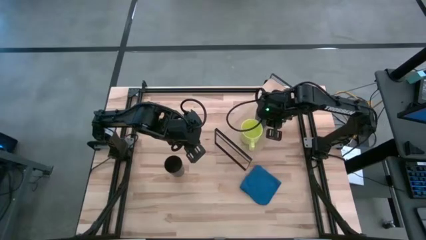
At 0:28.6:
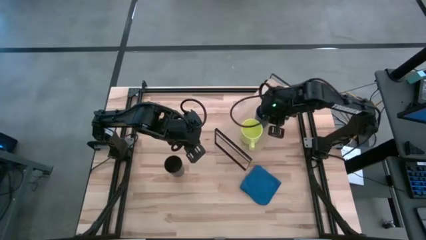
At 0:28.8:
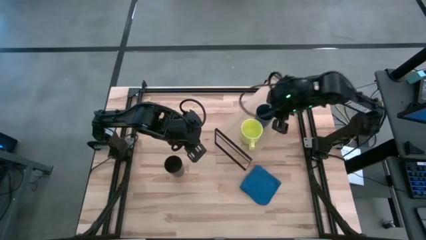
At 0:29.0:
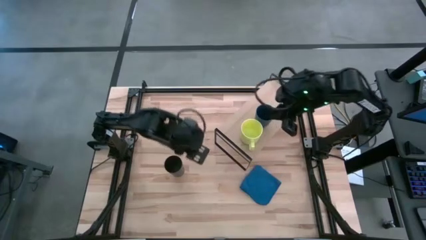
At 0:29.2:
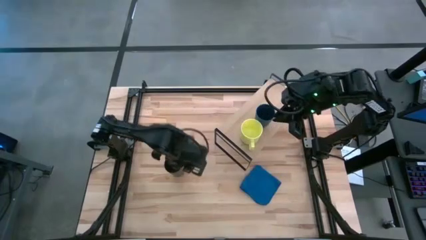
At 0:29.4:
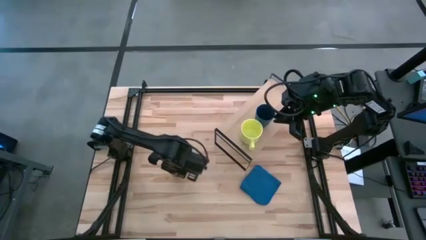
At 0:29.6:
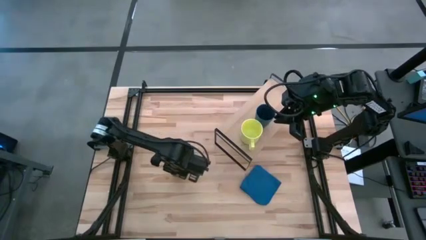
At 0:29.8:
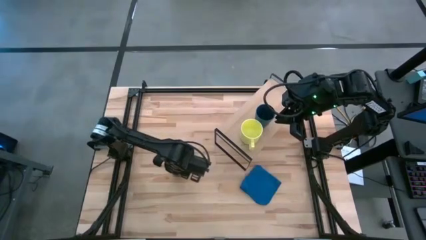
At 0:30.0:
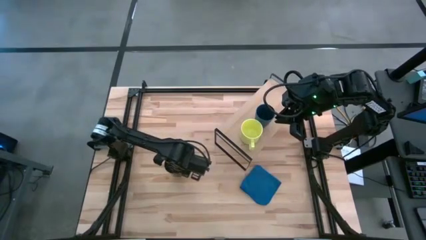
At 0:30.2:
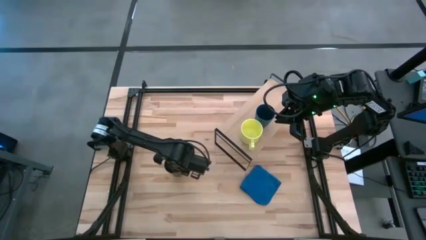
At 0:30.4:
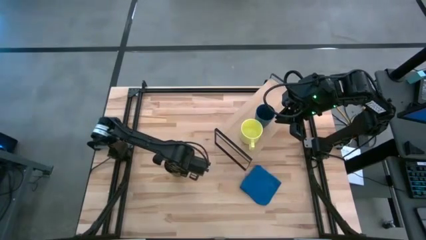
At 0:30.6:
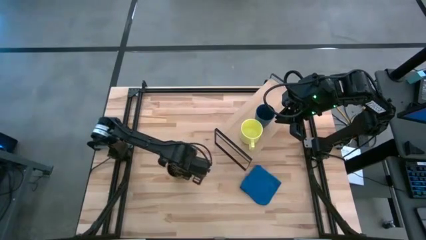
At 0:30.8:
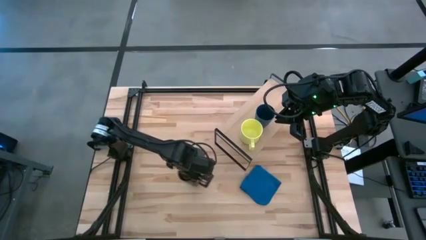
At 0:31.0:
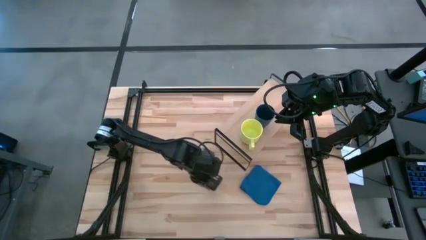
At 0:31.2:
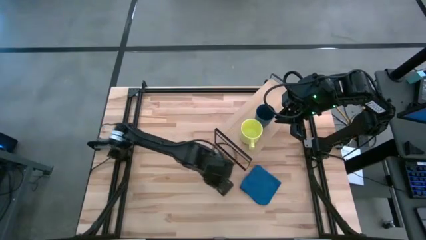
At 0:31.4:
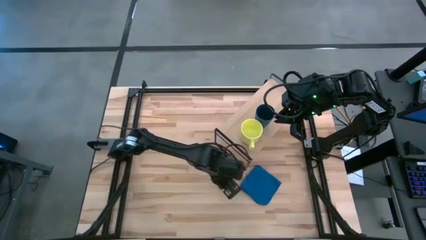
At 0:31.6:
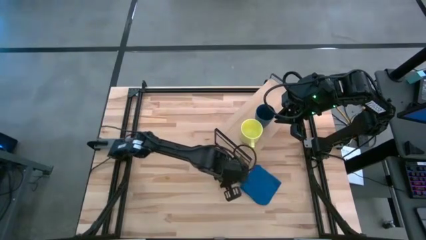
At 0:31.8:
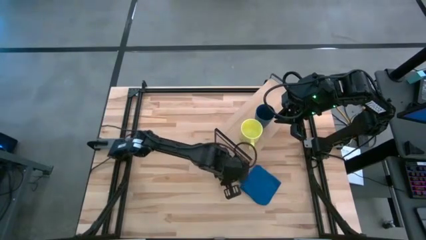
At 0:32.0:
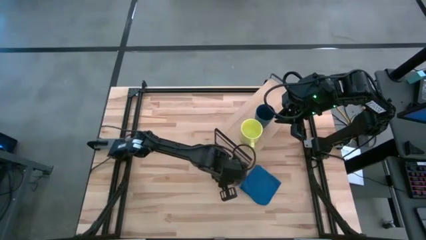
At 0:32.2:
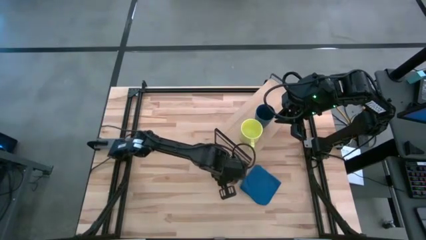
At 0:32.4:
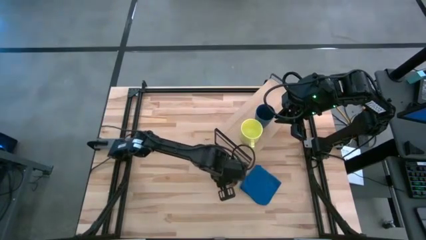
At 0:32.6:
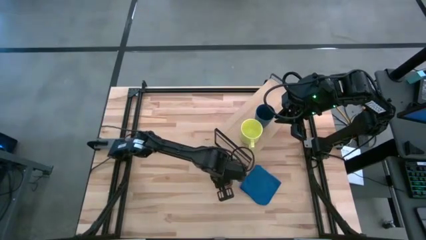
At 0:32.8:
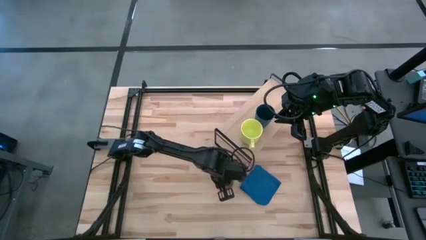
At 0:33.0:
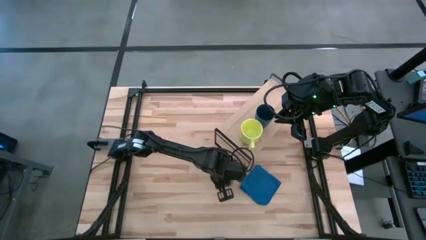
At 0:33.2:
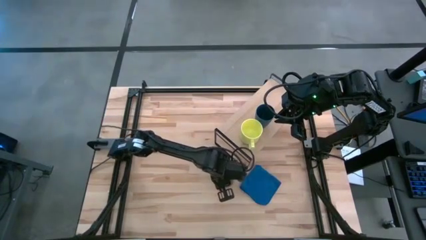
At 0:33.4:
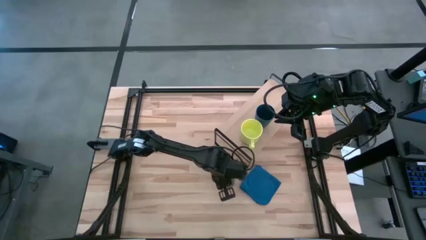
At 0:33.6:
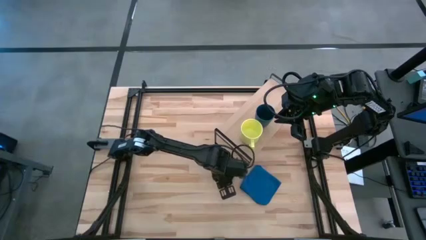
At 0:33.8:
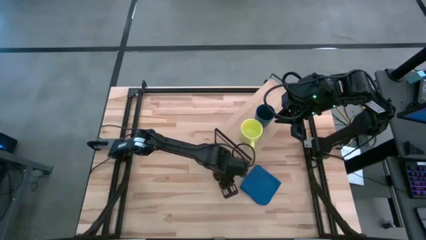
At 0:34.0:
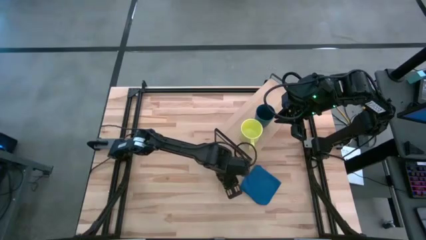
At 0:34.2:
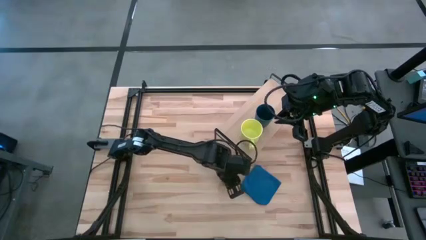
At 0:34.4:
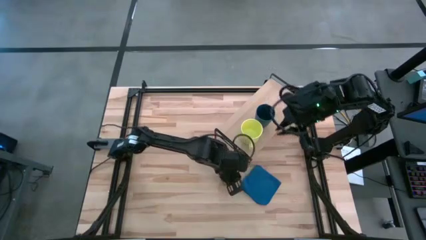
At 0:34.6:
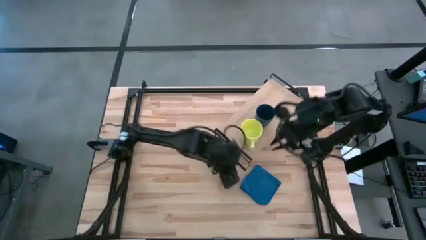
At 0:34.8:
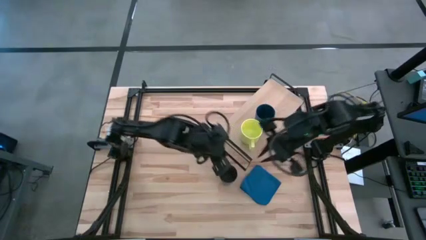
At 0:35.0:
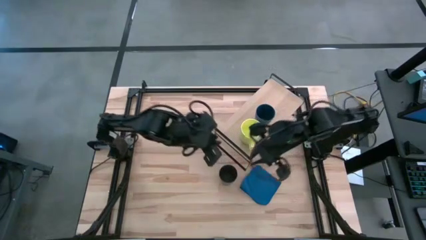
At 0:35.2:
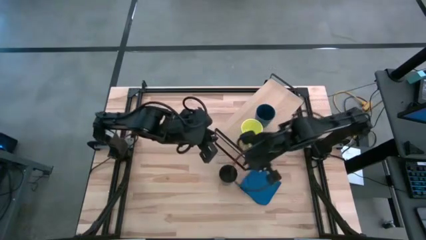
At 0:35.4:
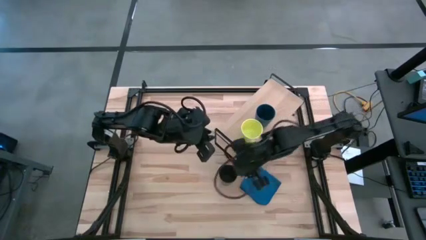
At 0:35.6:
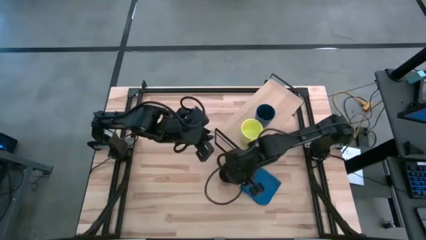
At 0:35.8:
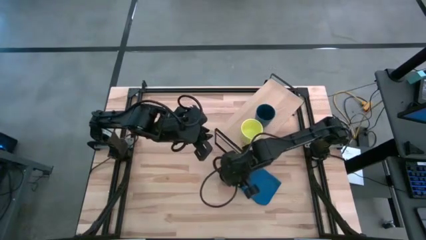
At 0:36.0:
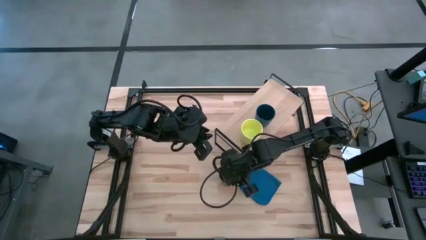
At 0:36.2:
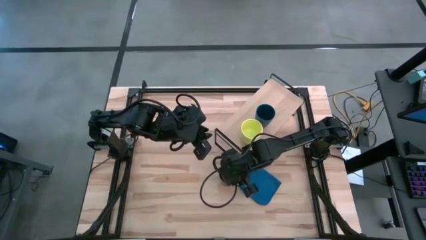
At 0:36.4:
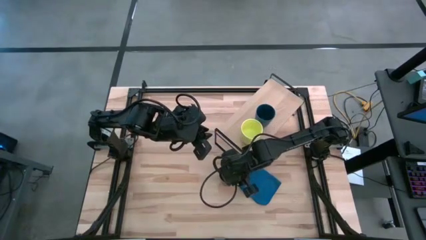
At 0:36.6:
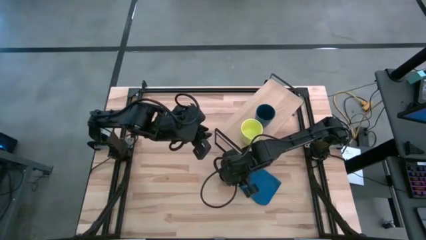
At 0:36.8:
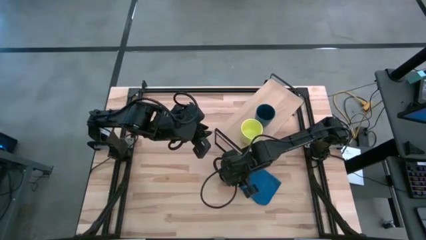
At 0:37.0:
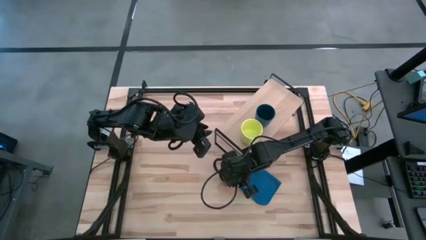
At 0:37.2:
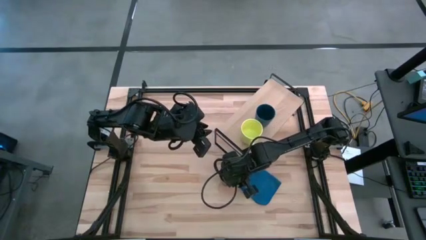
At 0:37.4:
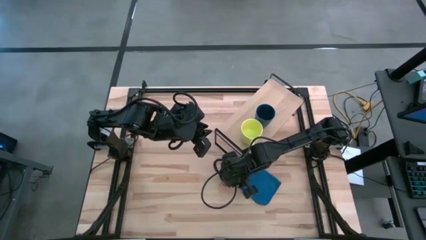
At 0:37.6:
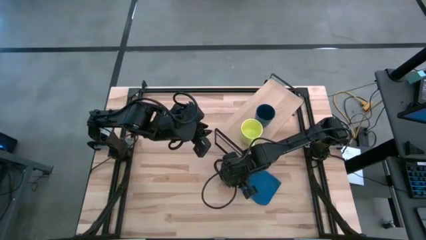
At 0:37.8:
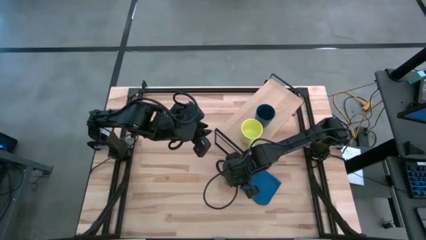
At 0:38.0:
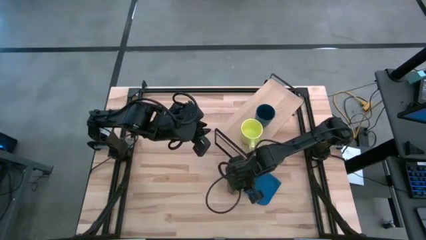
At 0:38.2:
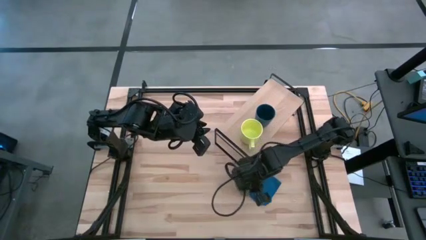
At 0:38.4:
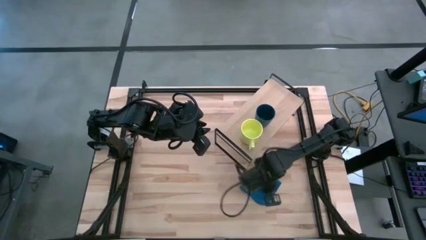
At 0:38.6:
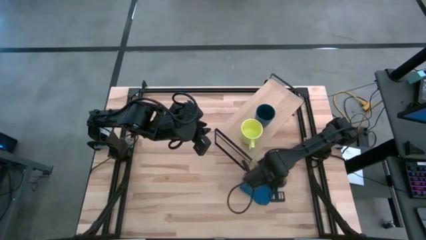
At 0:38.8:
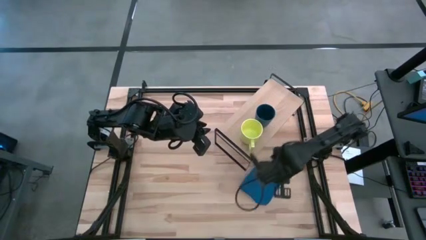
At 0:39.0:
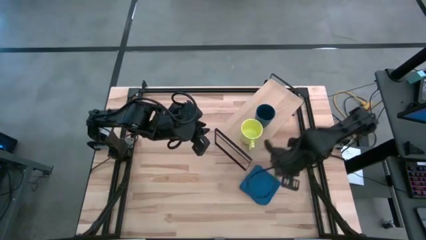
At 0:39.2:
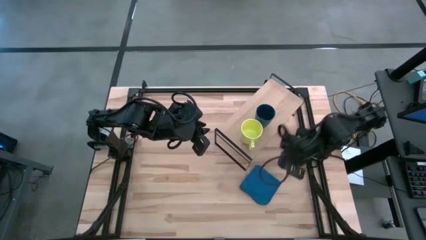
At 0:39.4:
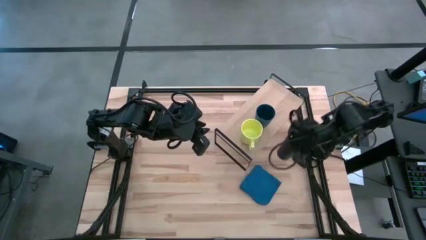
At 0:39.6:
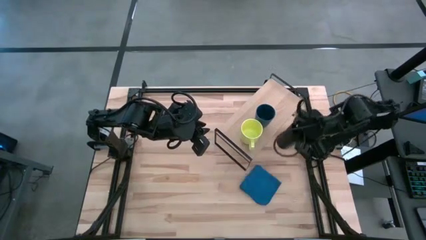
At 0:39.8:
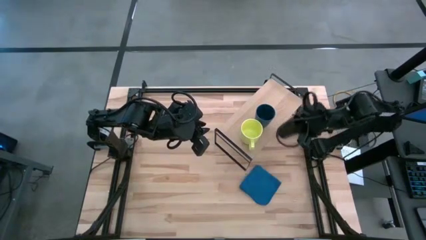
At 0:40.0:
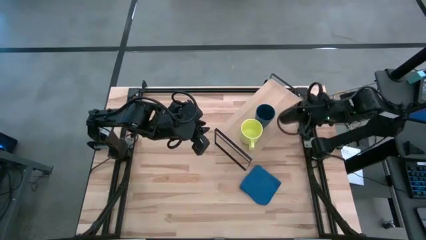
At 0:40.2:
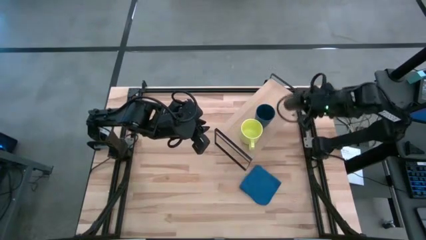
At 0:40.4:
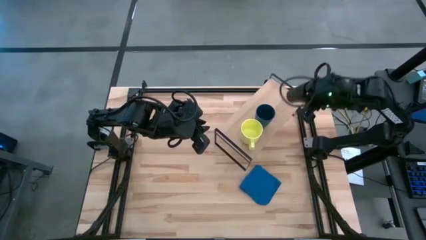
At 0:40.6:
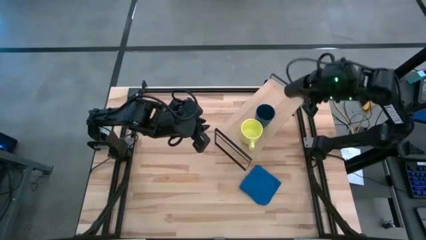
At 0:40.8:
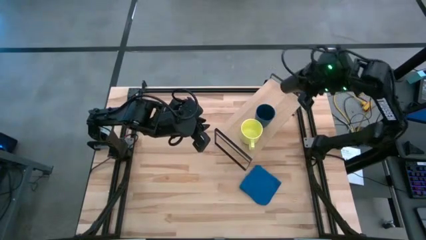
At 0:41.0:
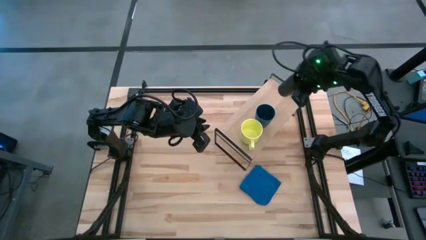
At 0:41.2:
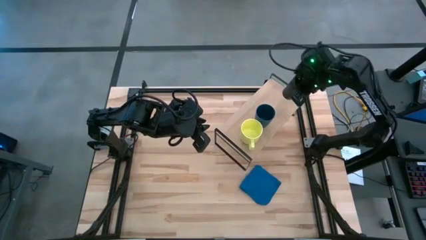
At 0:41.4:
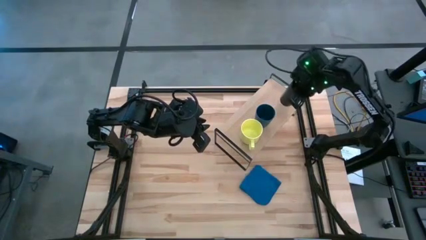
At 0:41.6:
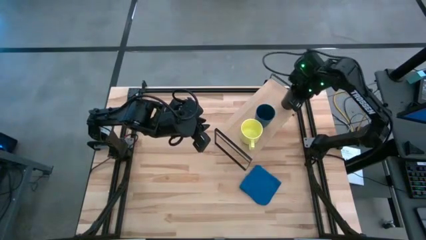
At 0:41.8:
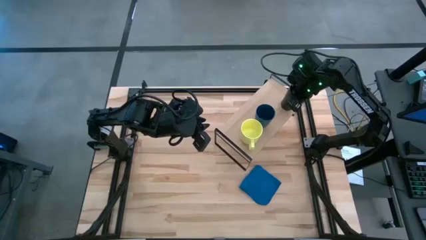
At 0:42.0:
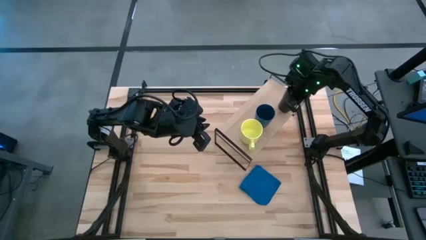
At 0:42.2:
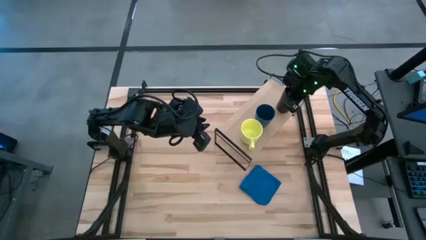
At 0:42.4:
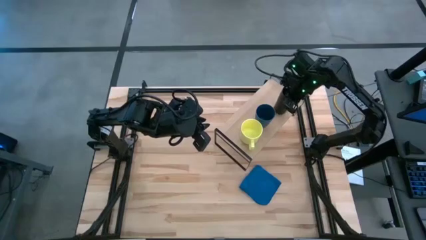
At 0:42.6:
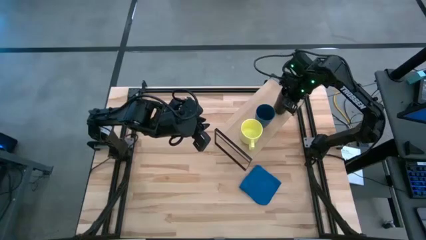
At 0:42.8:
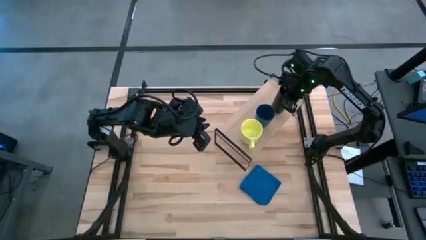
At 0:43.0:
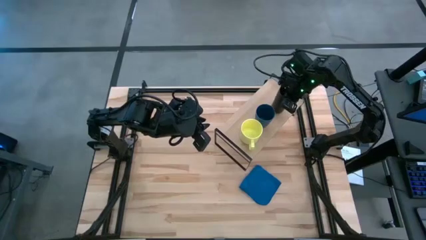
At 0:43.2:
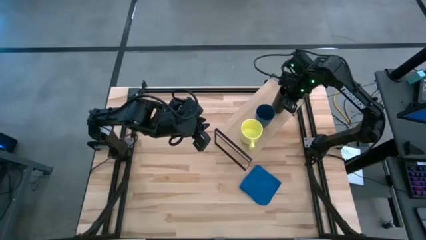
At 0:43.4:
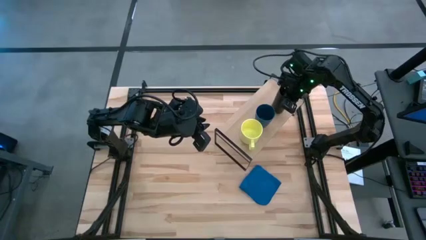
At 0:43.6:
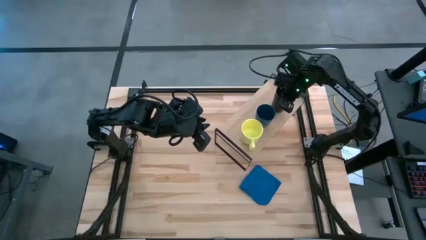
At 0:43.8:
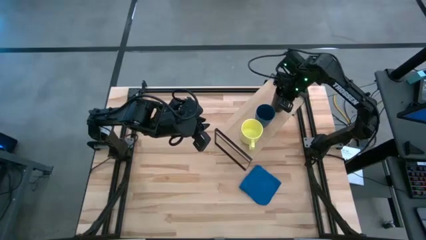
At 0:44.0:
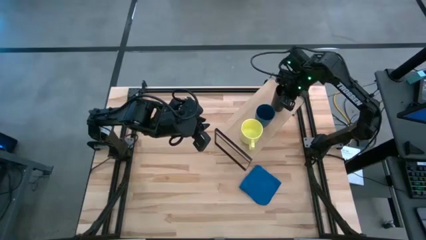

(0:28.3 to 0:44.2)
Task: Stack small to large cups/mugs on shelf
Put the black cup on the shelf
